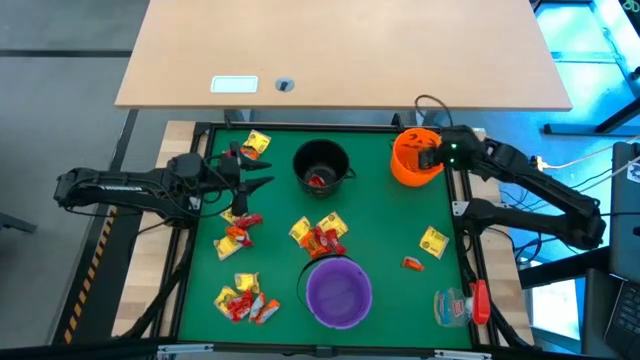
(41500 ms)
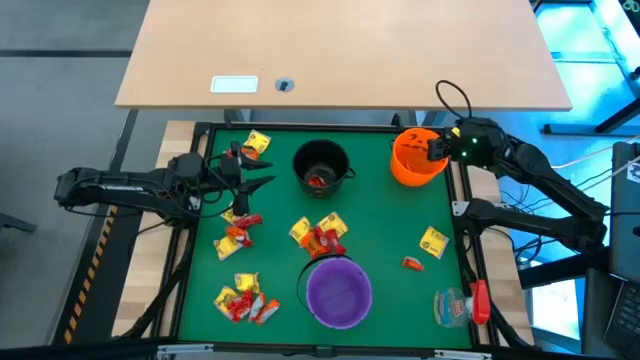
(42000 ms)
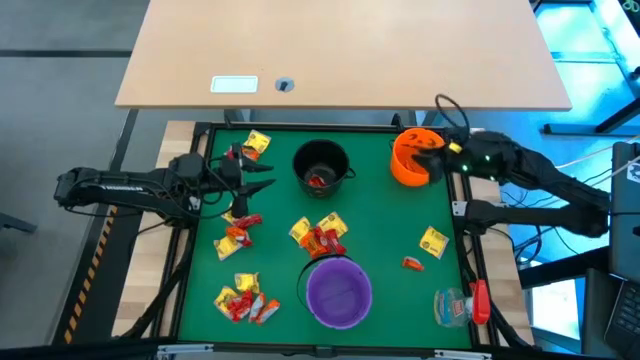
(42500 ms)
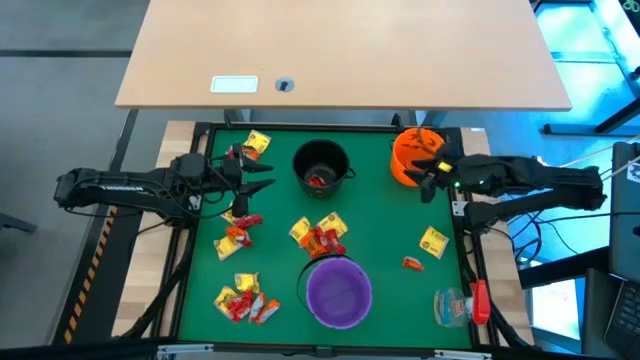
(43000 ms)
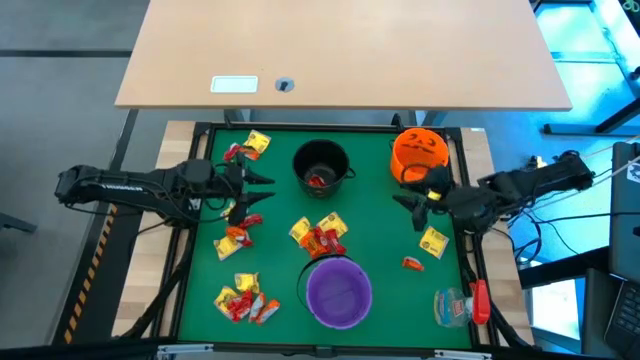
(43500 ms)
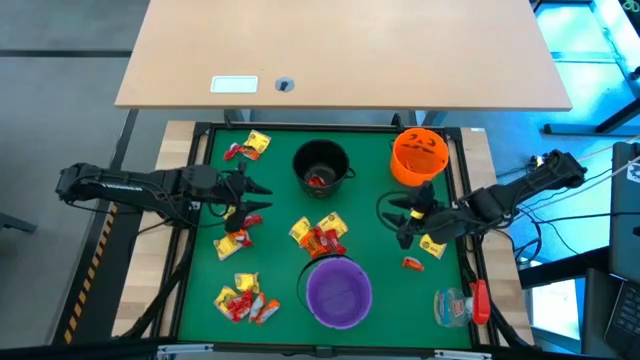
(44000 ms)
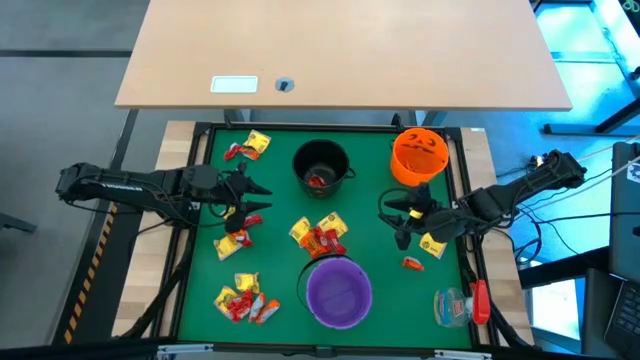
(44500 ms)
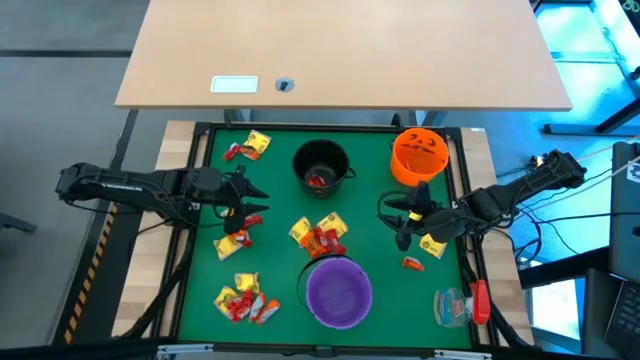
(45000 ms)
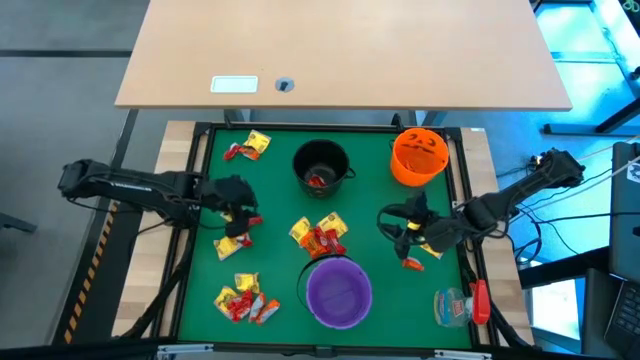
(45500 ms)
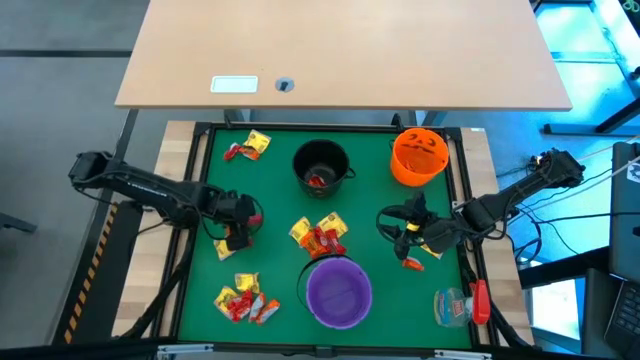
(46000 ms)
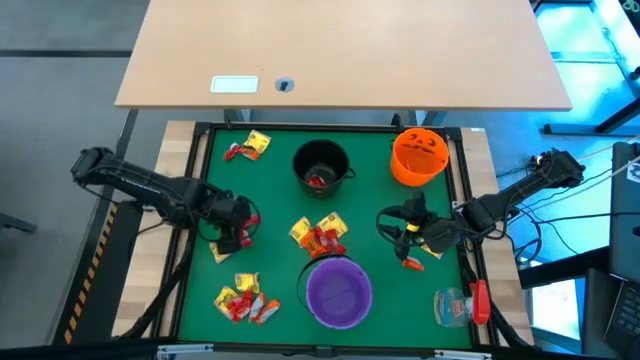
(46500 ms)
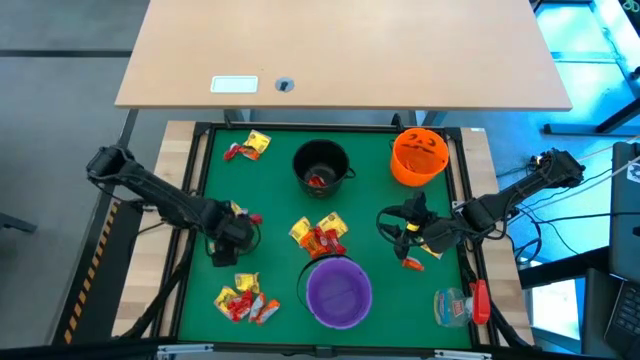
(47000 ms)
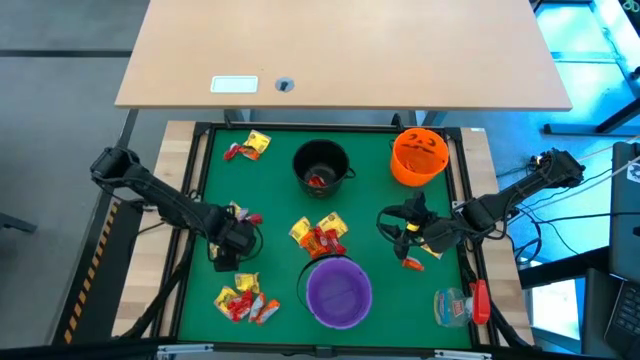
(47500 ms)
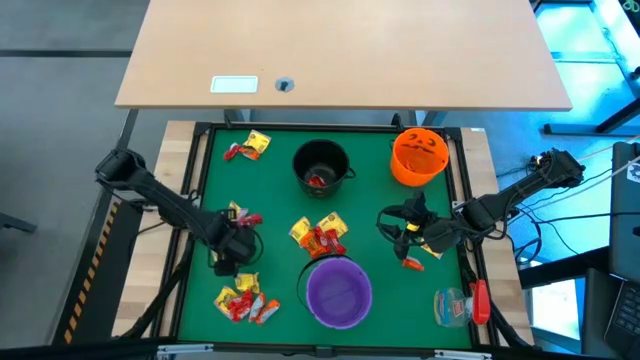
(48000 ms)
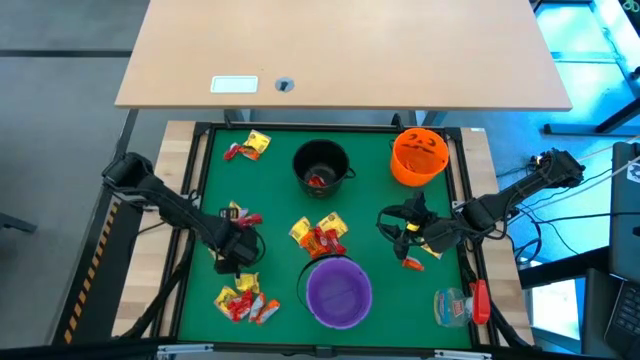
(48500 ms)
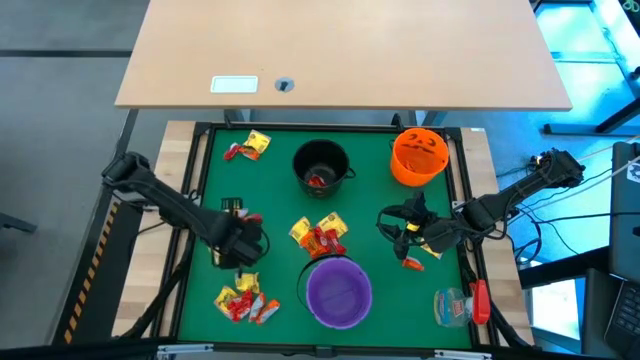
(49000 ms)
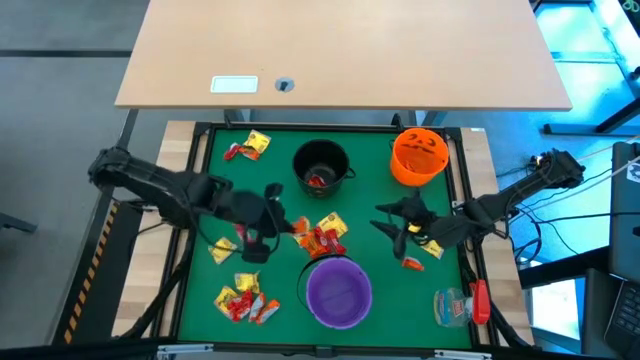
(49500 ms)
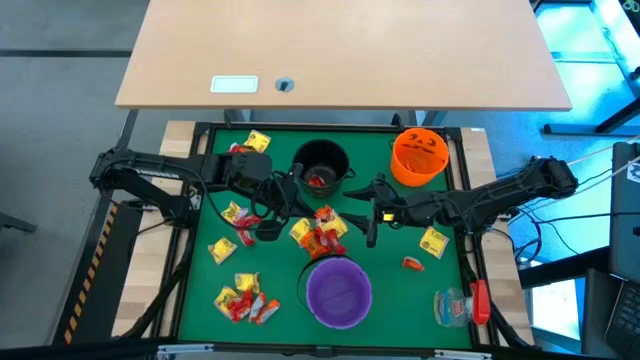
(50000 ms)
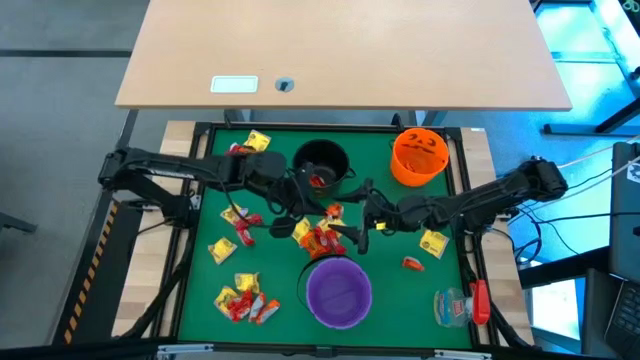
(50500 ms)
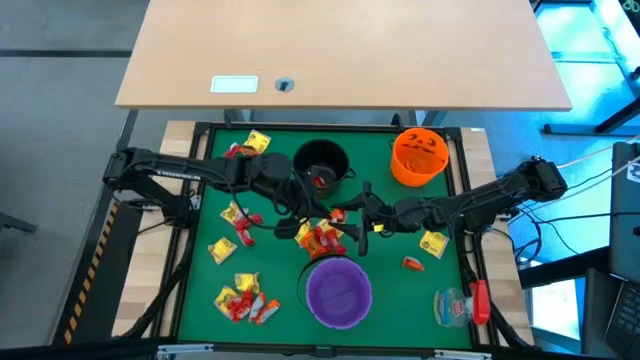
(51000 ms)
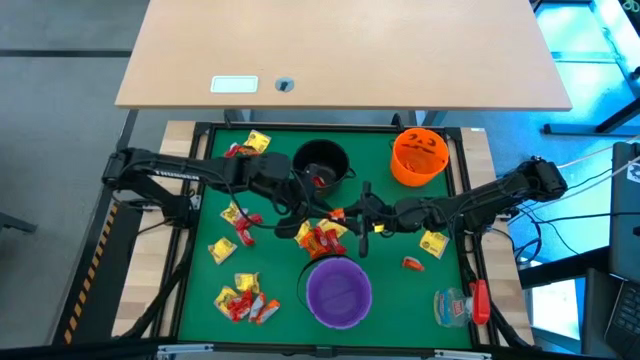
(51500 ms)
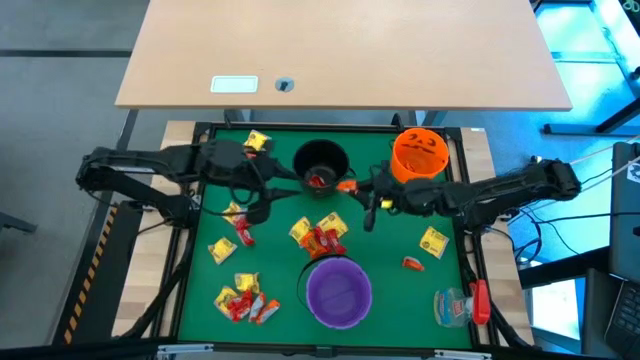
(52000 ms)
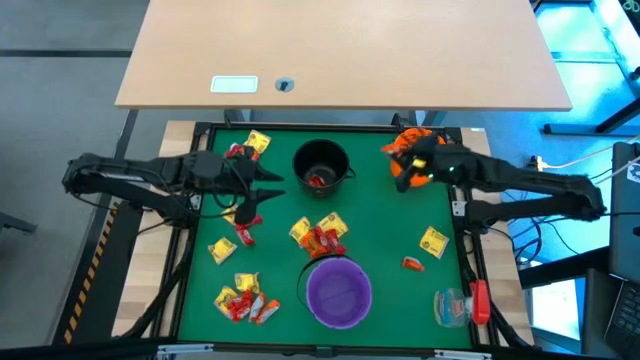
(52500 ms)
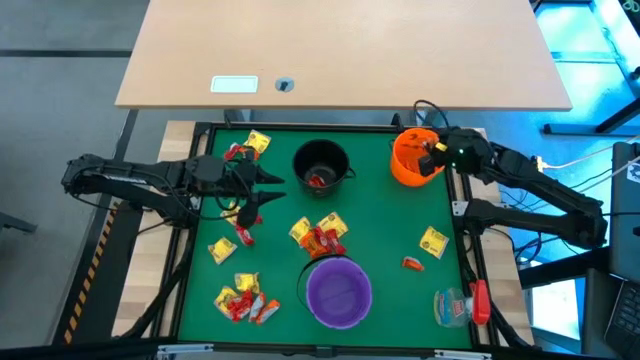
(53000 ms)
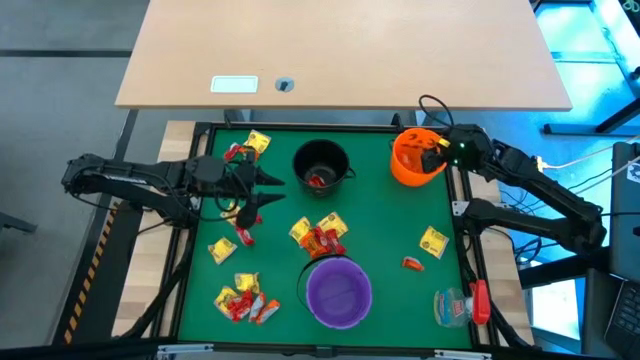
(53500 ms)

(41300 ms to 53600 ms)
Task: Sort candy
Put the orange candy into the orange bucket

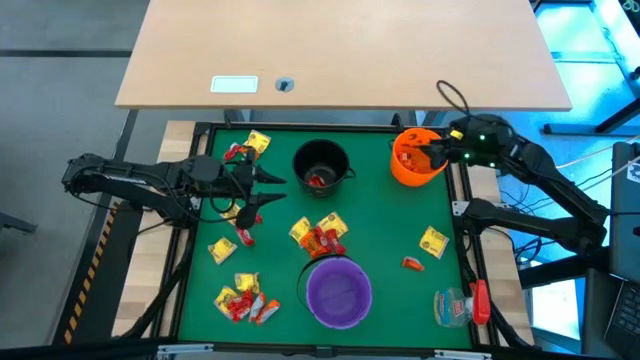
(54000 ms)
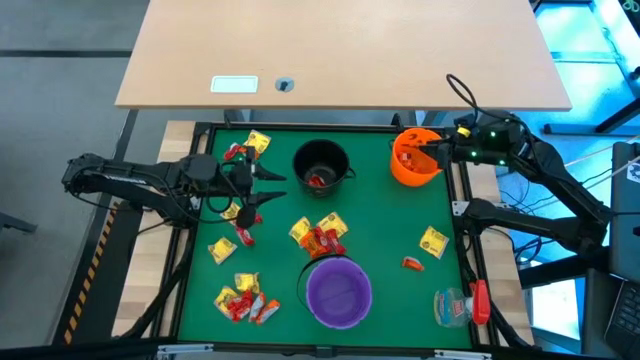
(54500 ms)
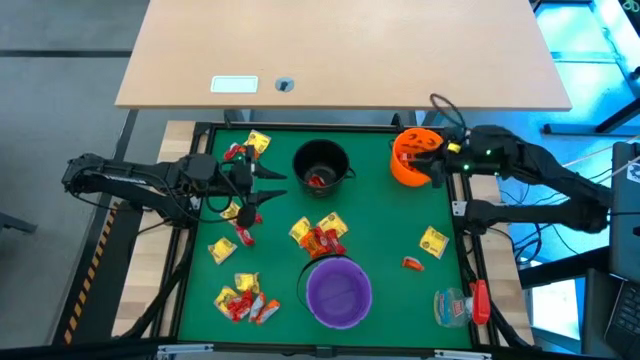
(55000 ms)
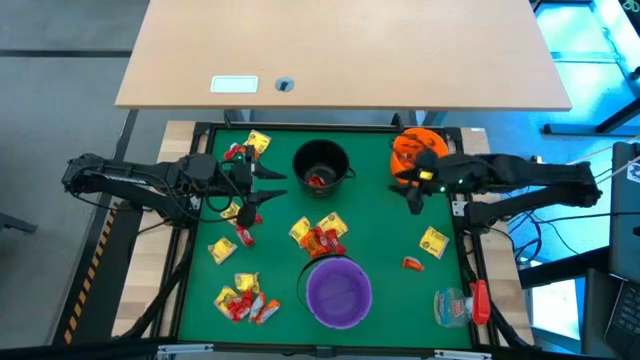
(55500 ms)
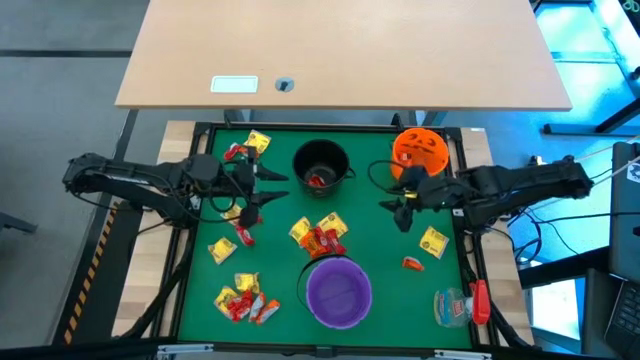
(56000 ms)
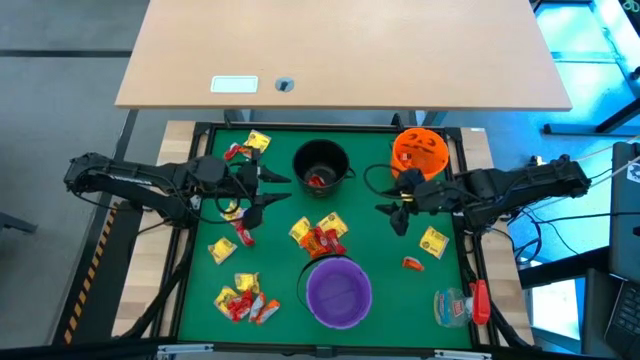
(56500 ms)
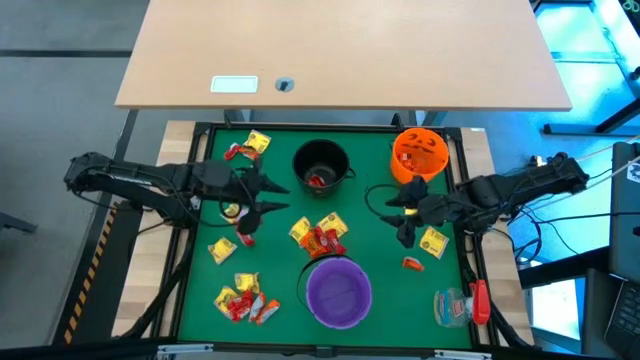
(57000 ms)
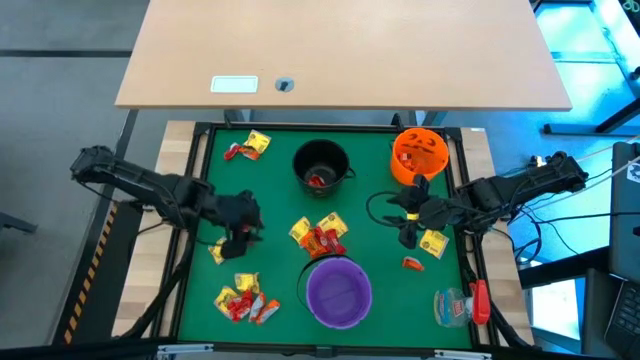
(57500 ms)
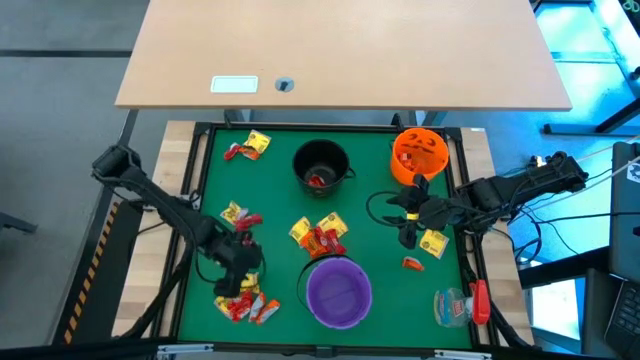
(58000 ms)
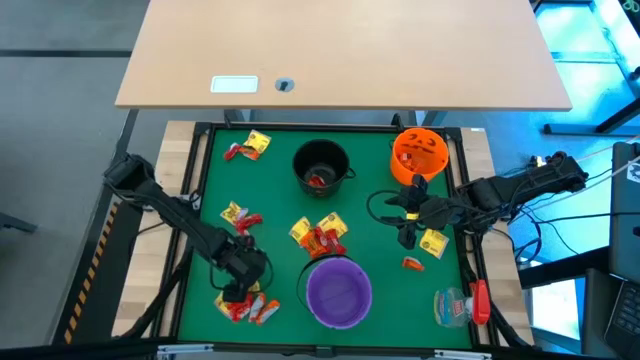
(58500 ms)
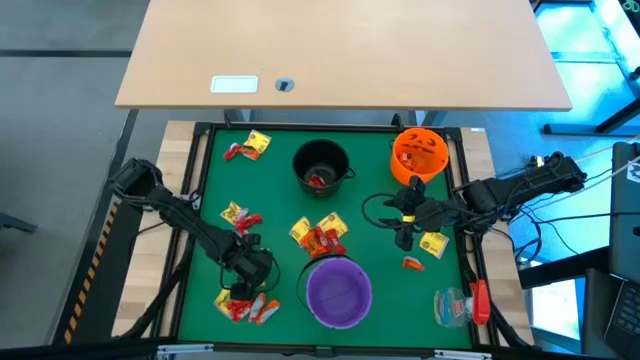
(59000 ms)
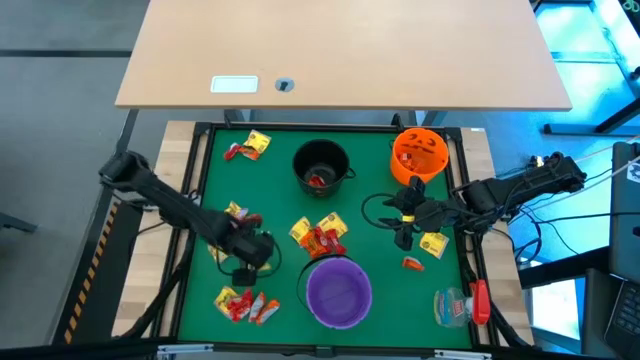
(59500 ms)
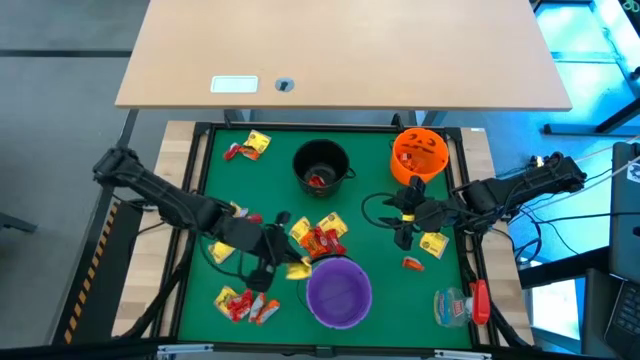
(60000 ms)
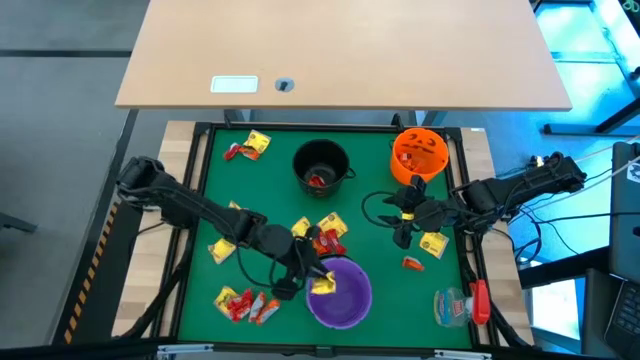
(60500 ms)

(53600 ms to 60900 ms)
Put the yellow candy into the purple bucket

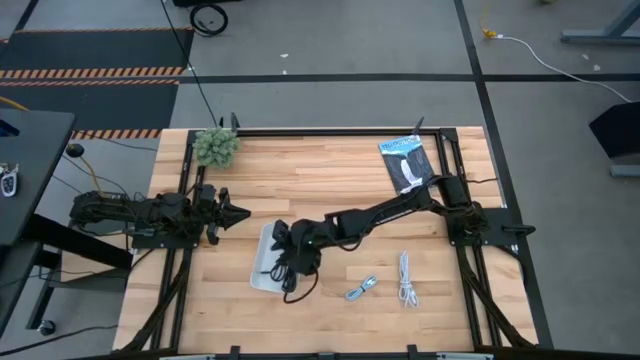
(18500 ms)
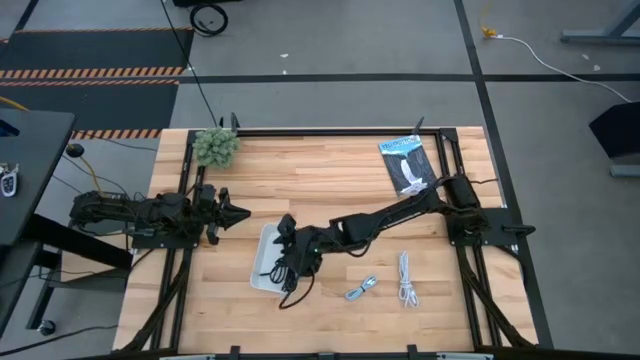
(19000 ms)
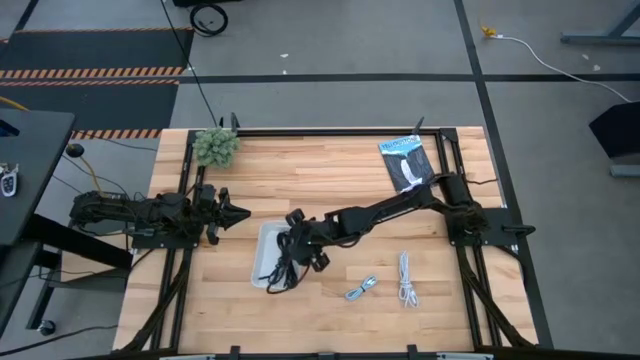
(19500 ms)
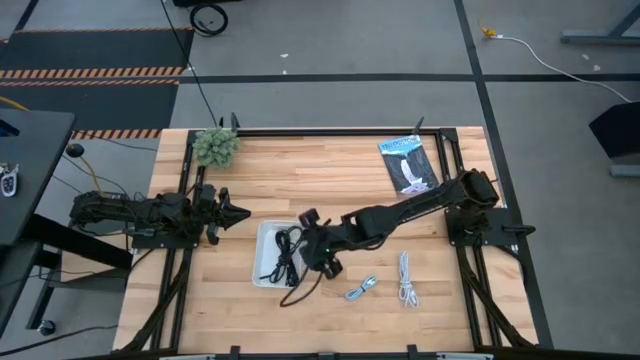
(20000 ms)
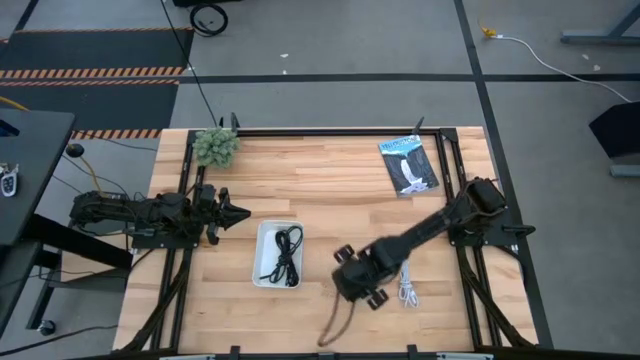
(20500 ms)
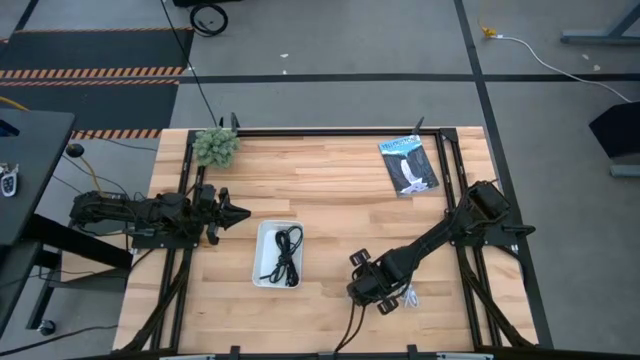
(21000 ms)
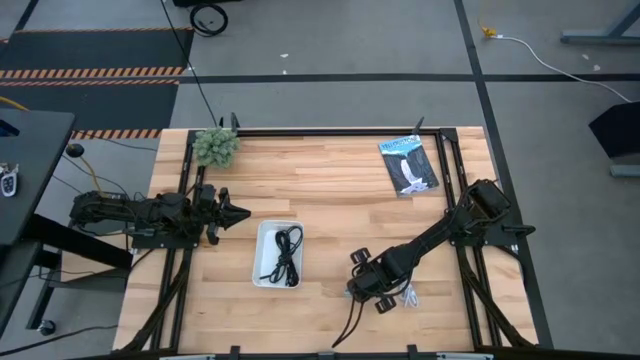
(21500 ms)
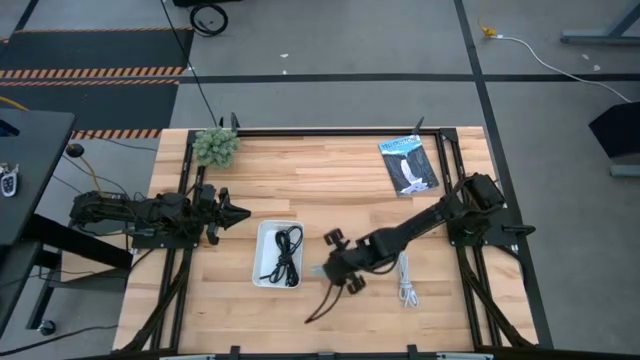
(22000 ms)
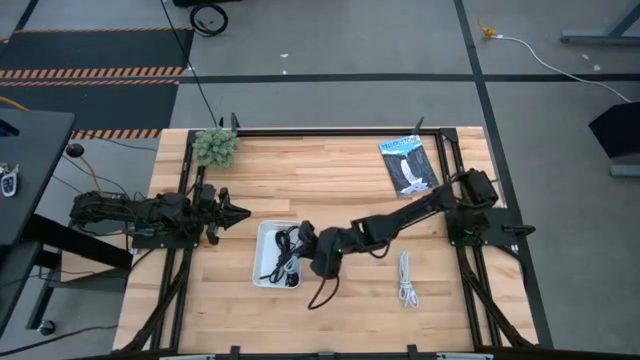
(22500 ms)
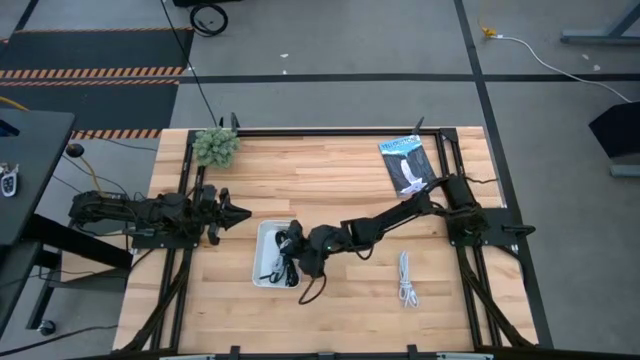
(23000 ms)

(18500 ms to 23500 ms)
Task: Pick and place USB-C Cables
Put the blue charger cable into the white bin
